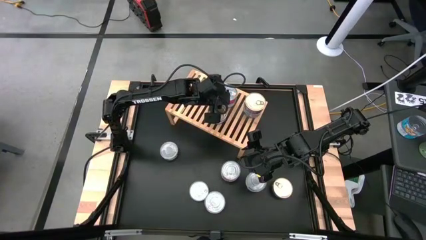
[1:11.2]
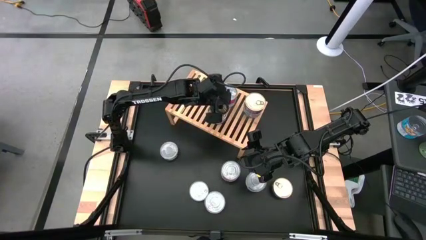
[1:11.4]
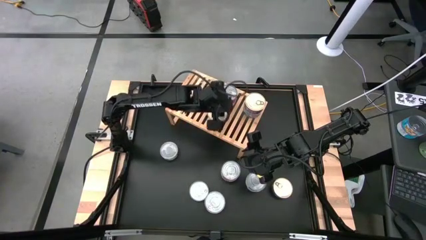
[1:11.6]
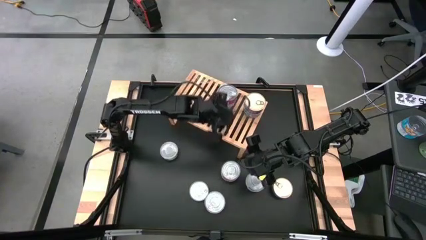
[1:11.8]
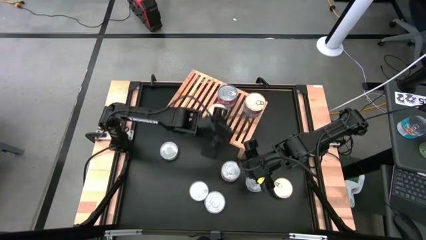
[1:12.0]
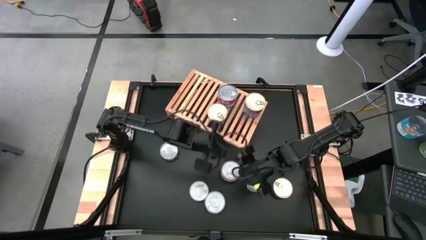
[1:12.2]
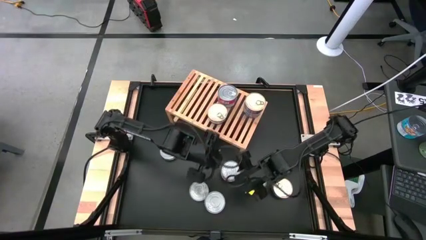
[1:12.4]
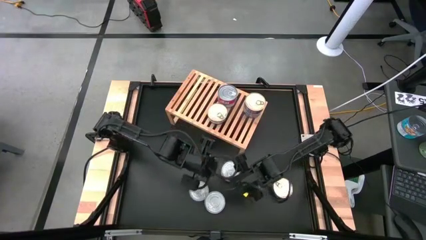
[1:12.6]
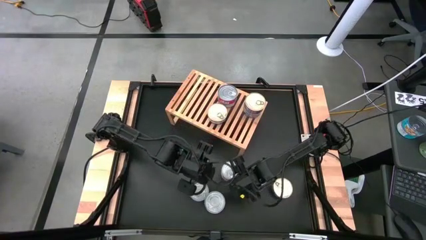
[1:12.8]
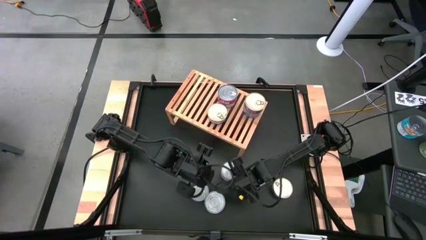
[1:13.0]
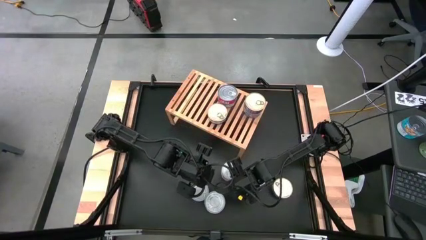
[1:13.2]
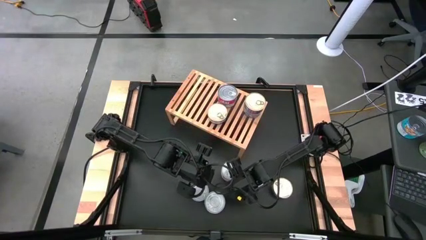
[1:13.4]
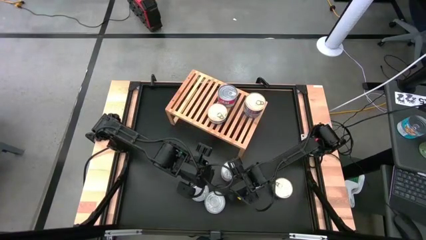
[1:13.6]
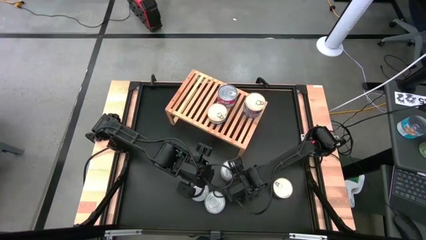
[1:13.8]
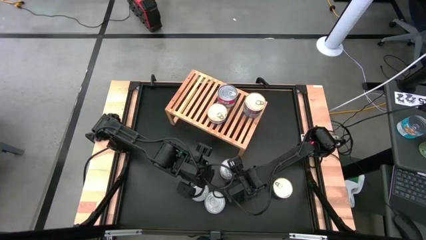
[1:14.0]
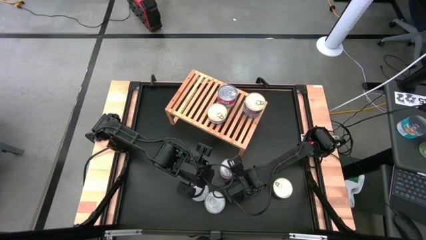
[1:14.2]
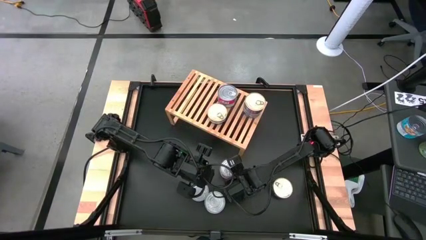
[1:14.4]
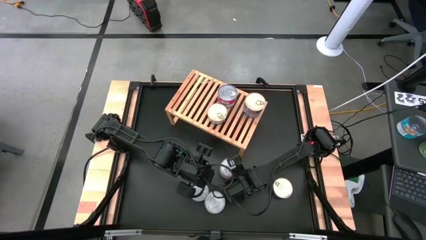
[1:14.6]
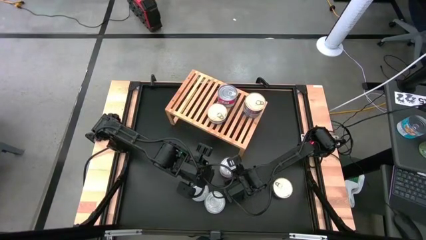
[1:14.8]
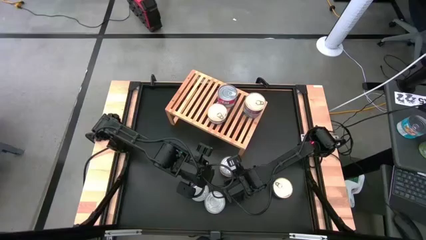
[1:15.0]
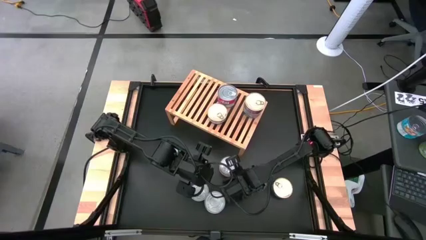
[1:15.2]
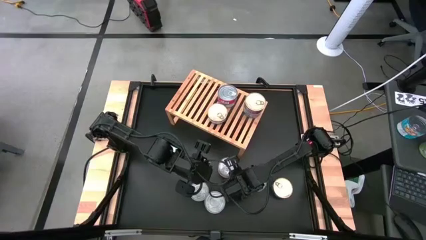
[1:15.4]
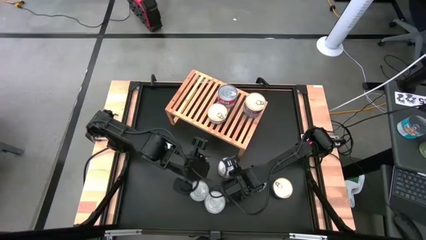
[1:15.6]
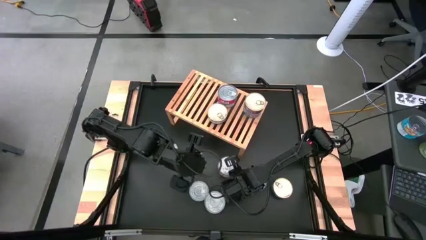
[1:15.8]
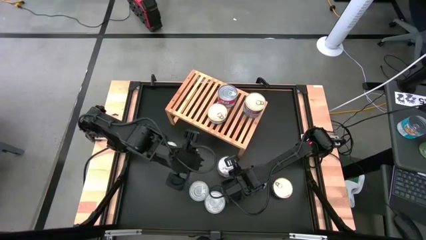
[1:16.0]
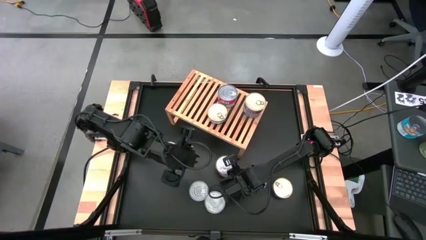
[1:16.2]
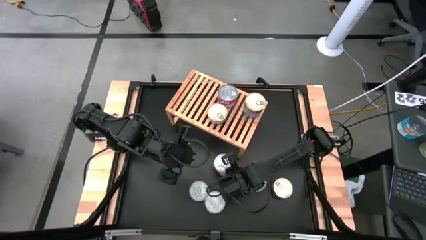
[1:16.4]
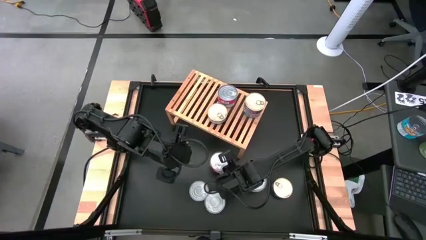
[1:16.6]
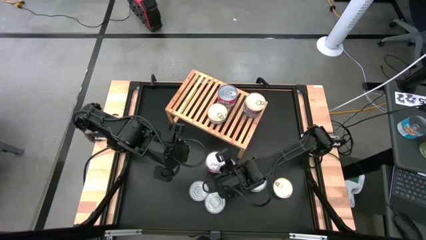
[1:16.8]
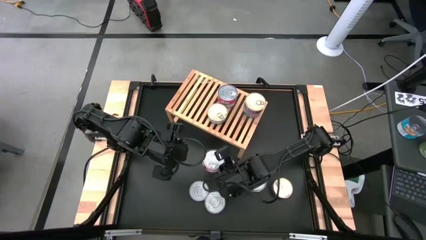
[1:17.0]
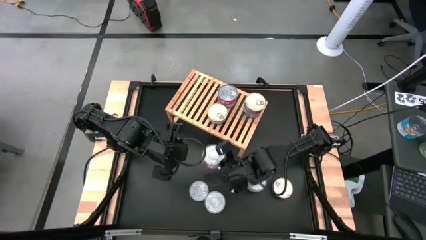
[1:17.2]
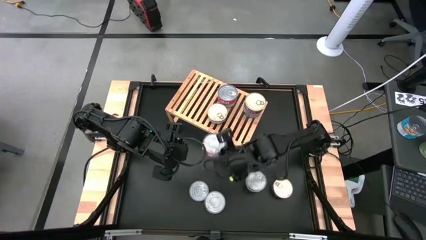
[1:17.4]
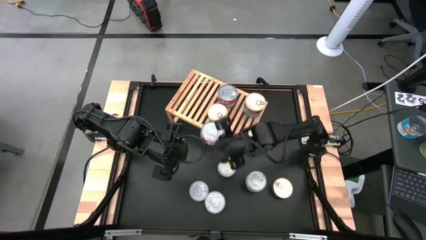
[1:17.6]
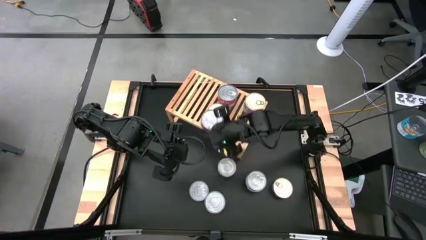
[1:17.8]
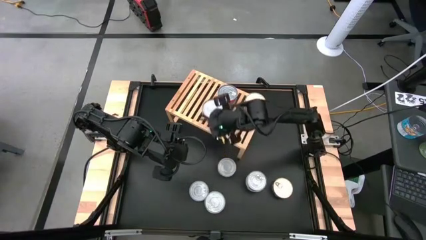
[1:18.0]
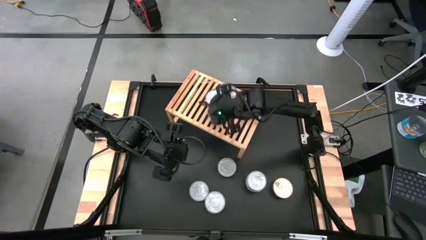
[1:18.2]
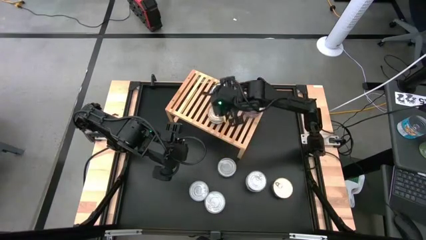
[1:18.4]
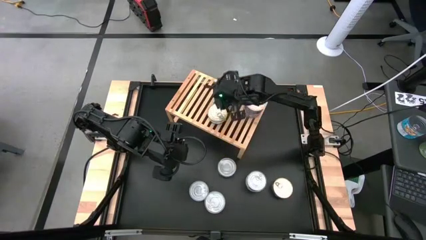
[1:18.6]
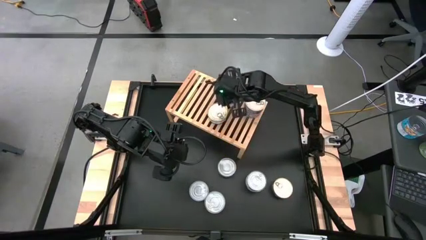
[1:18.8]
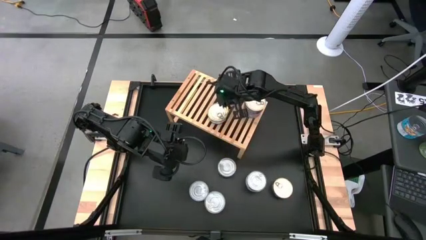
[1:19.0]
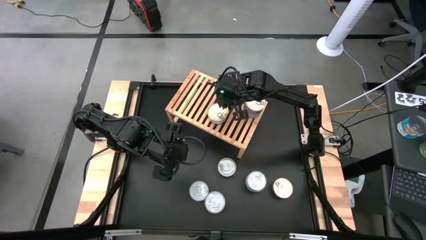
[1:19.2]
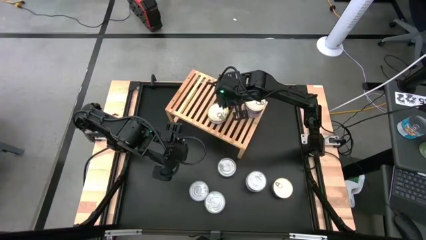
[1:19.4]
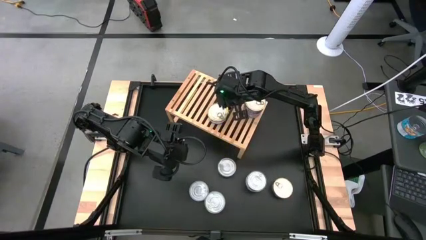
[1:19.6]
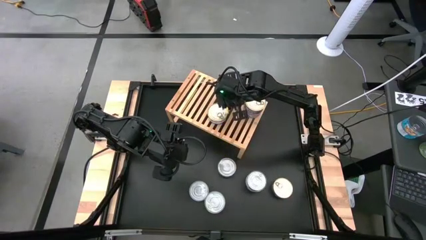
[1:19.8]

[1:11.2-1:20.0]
Task: Stack canned seafood by type on shelf
Stack the red tuna can on top of the red tuna cans on the shelf

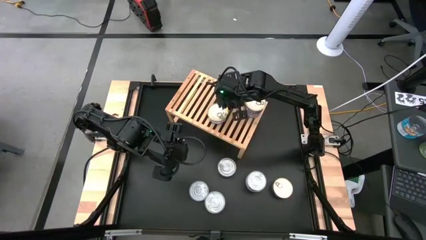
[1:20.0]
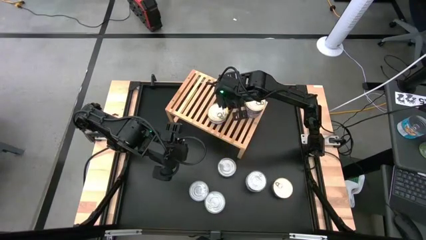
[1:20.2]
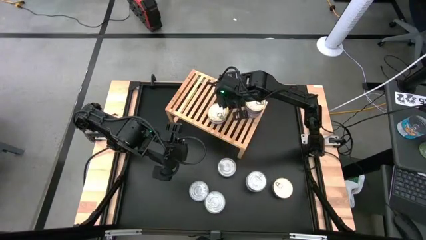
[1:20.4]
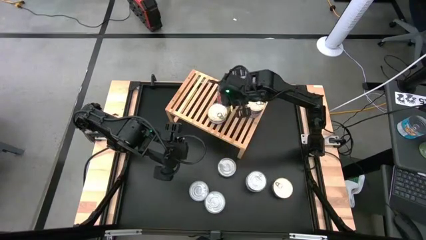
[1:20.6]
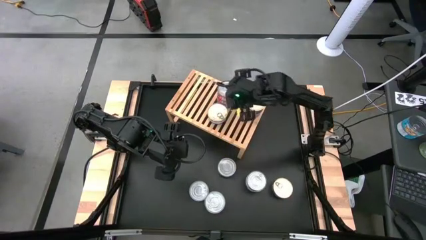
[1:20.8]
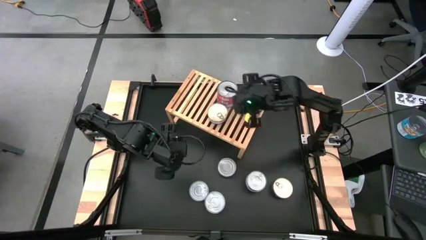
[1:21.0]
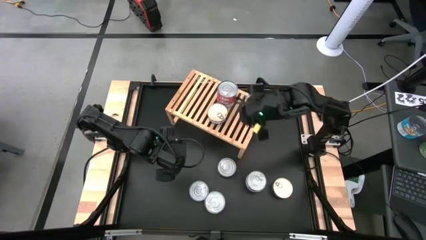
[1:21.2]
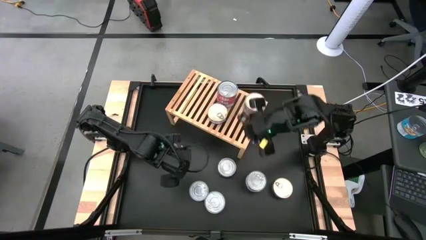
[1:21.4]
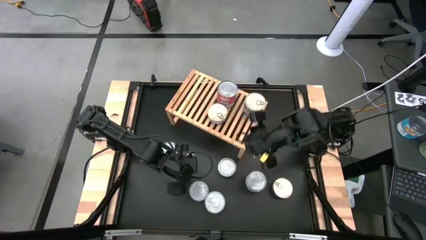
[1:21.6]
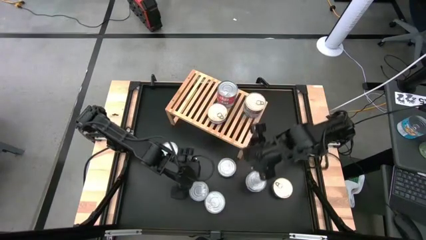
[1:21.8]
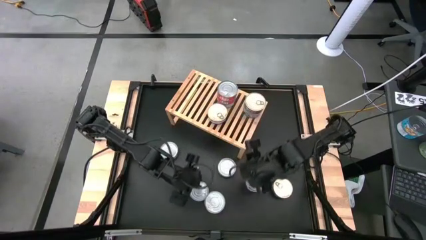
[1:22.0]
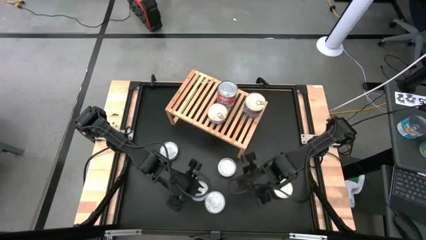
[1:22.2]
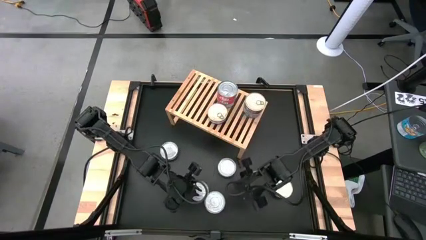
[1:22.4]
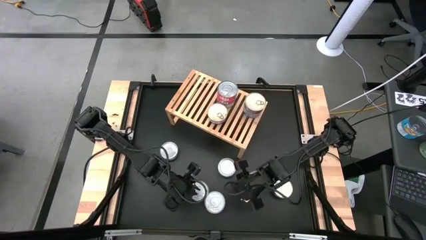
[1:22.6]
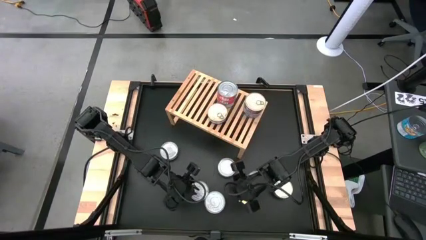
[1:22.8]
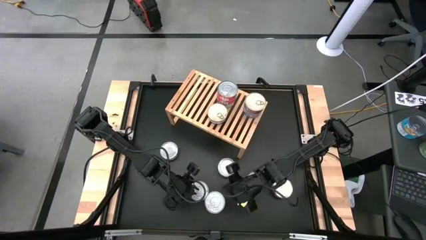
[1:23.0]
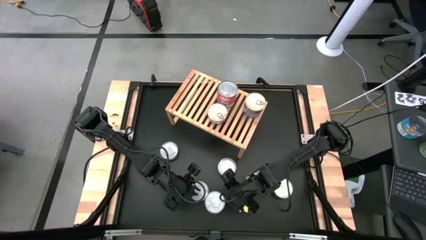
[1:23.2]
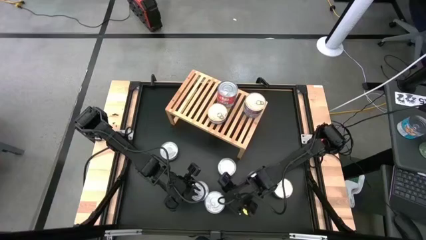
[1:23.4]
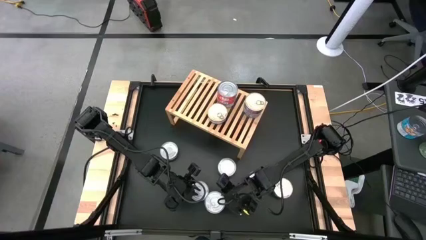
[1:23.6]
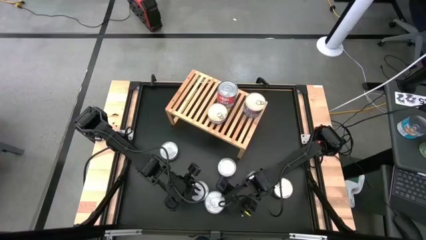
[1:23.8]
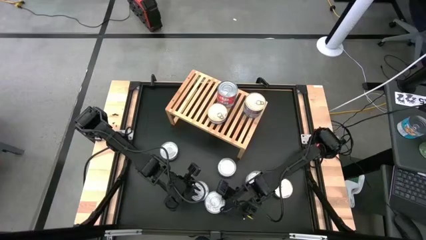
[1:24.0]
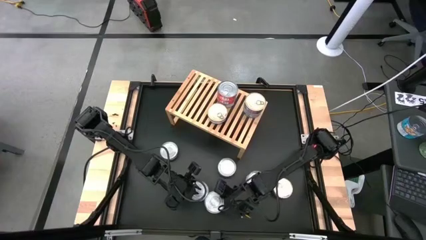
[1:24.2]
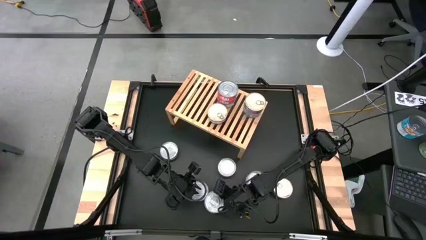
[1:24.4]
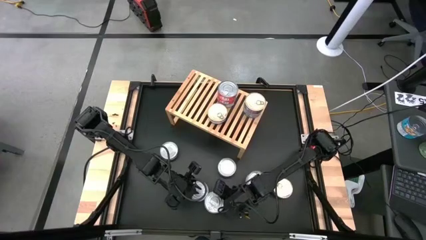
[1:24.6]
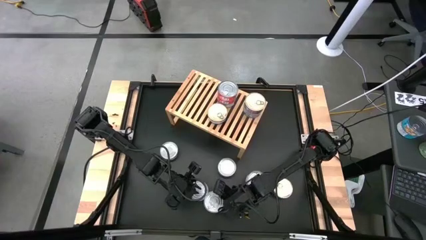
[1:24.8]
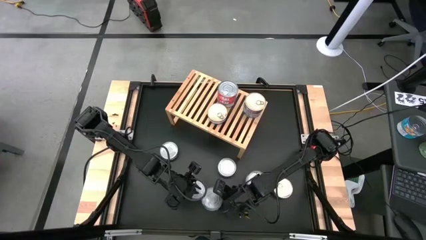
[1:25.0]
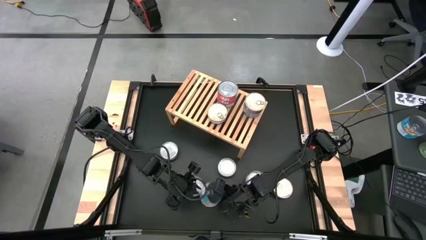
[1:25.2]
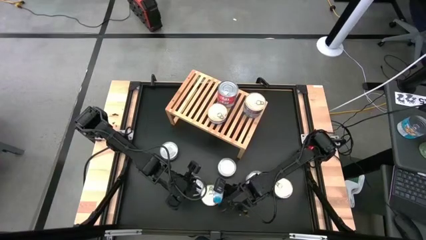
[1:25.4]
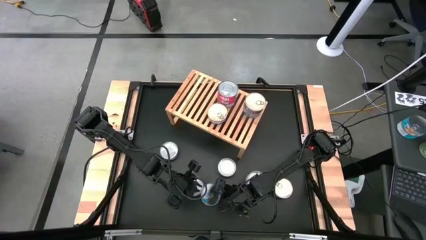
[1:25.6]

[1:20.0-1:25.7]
Put the yellow and blue tuna can on the shelf

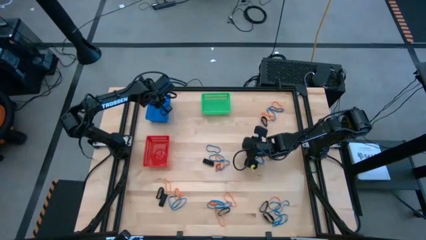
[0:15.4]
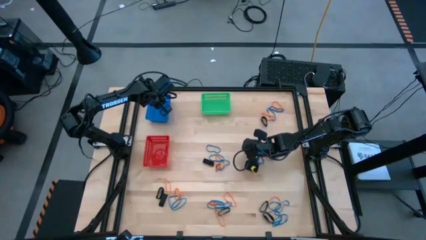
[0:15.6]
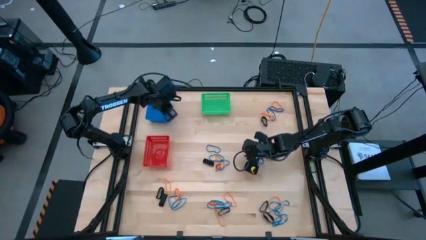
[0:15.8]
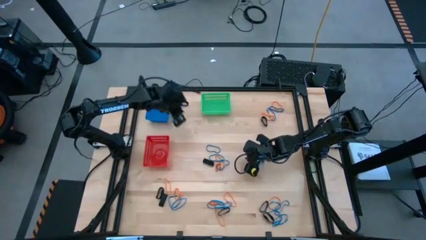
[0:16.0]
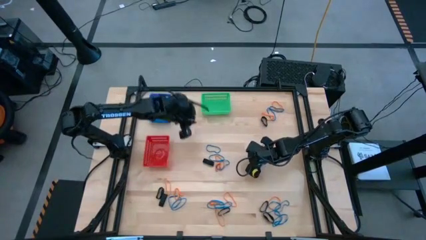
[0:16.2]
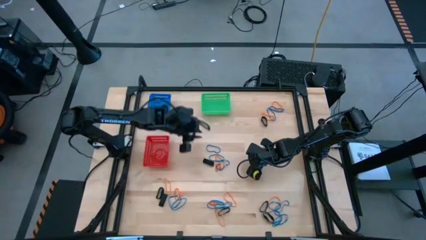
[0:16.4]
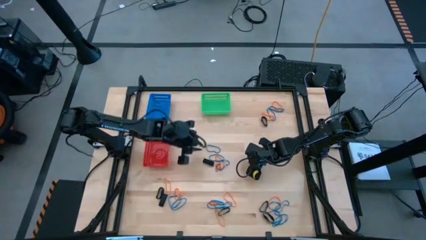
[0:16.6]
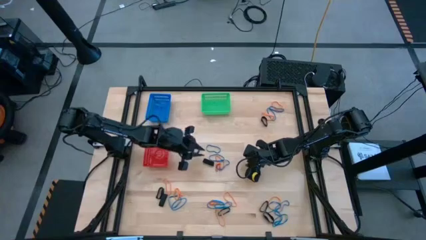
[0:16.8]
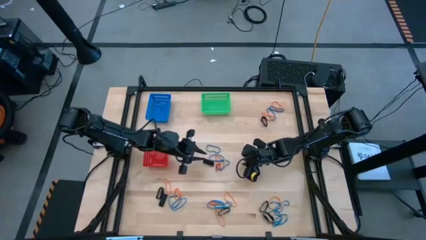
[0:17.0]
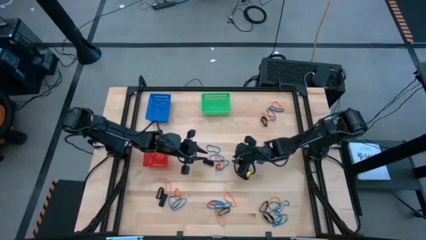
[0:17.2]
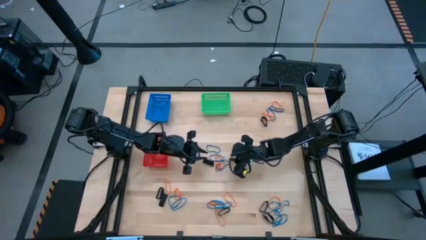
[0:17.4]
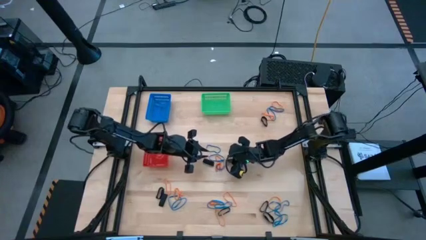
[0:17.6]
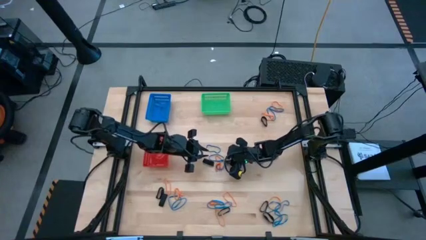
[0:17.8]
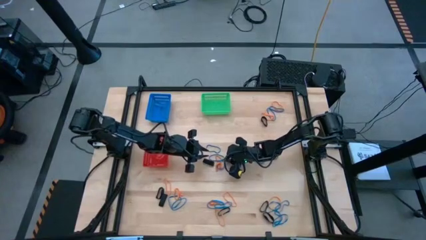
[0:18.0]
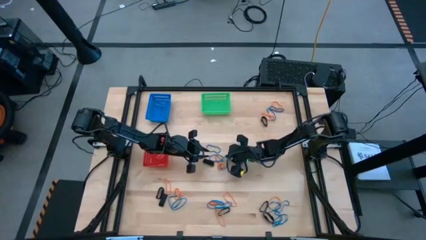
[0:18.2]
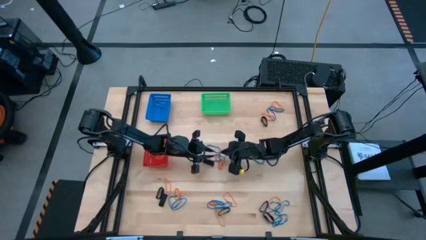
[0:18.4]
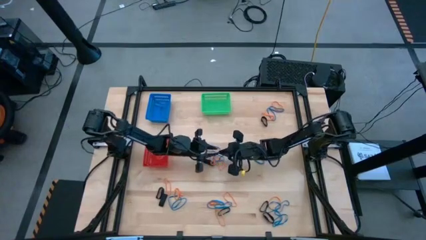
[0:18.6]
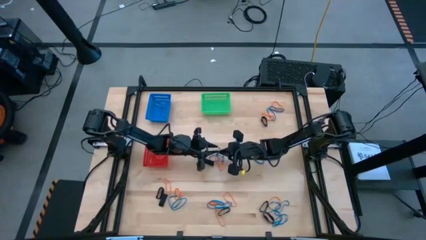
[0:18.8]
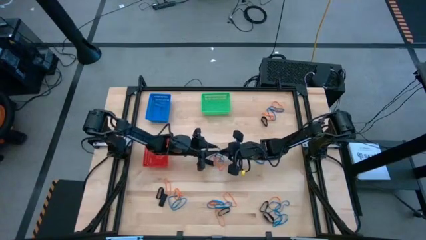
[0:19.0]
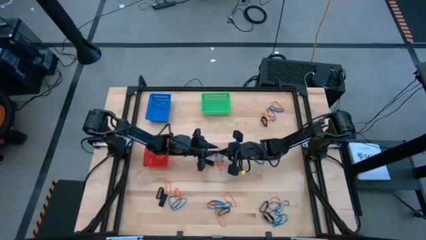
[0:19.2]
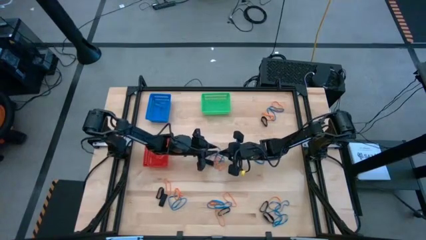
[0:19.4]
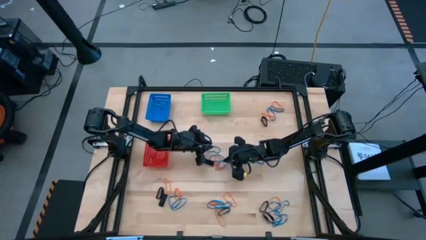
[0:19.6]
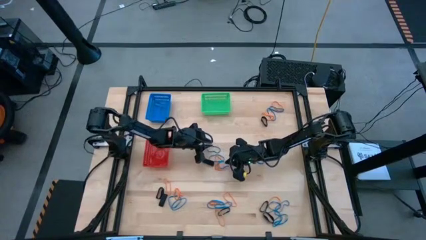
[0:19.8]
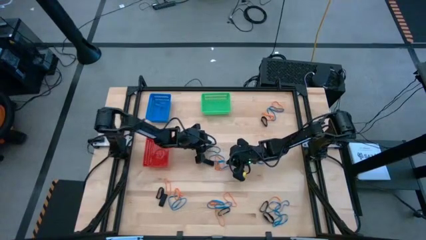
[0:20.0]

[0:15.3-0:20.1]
Task: Sort rubber bands into baskets
Put the blue rubber band into the blue bin
